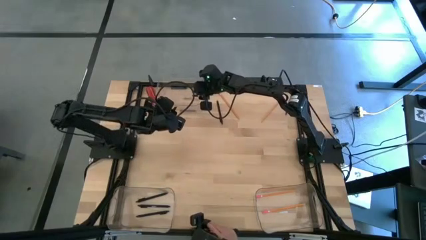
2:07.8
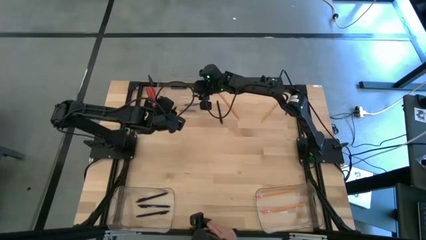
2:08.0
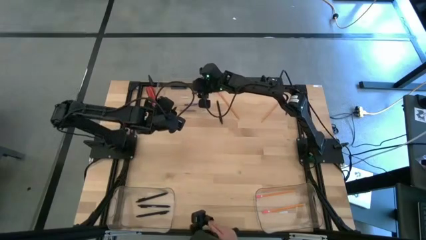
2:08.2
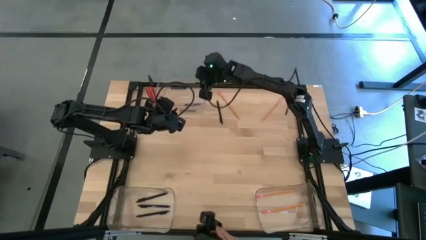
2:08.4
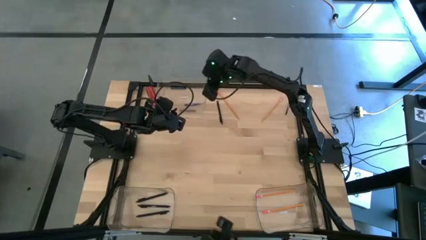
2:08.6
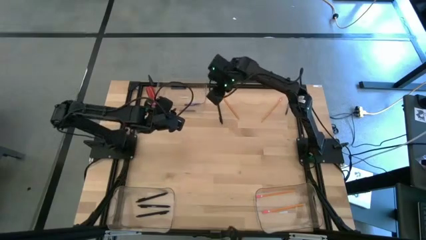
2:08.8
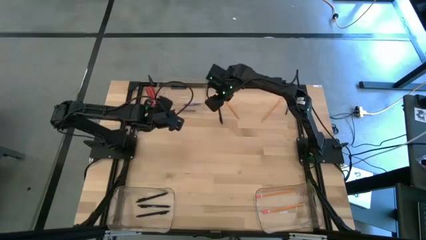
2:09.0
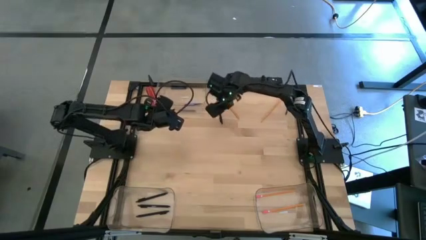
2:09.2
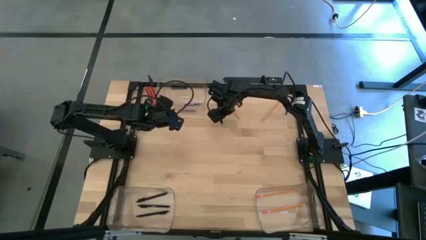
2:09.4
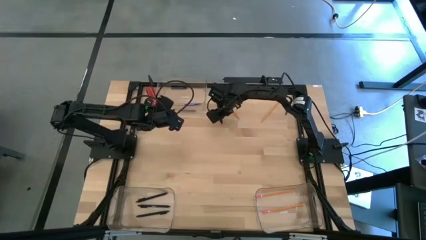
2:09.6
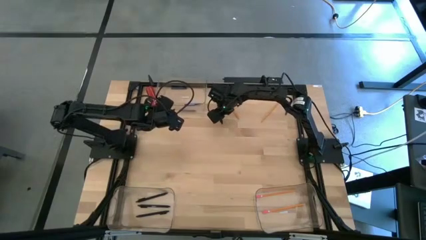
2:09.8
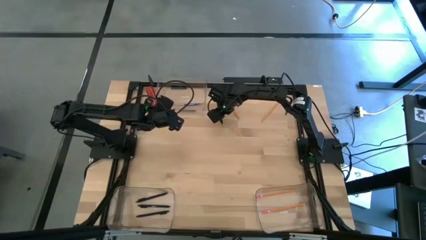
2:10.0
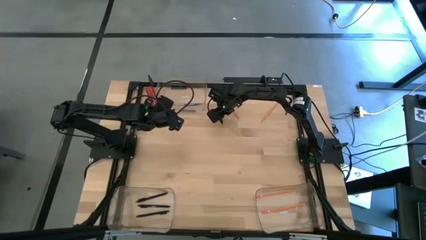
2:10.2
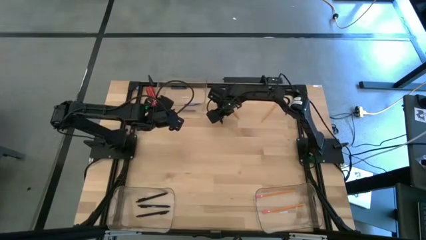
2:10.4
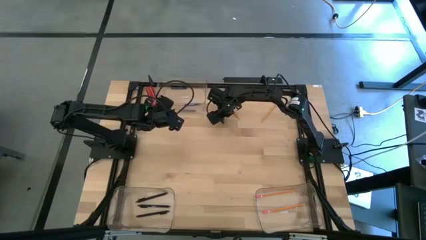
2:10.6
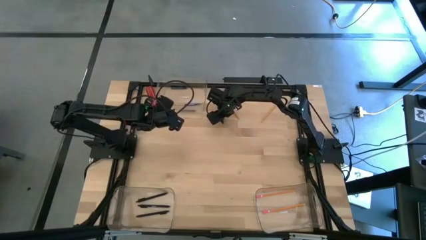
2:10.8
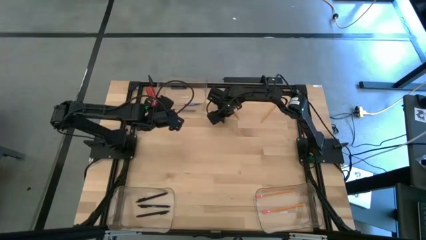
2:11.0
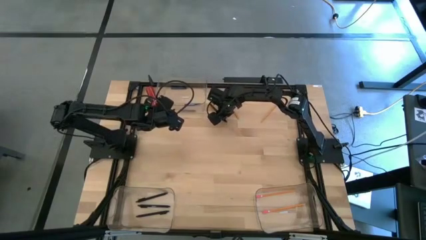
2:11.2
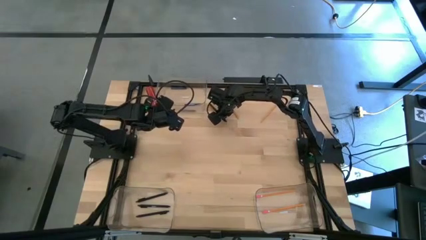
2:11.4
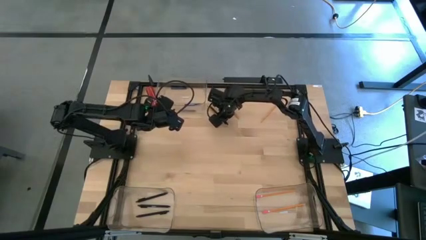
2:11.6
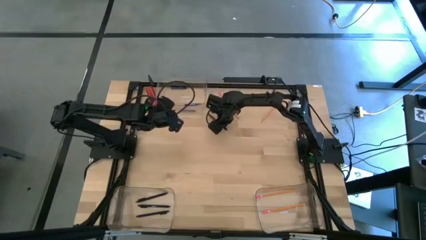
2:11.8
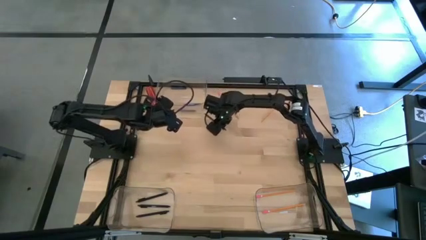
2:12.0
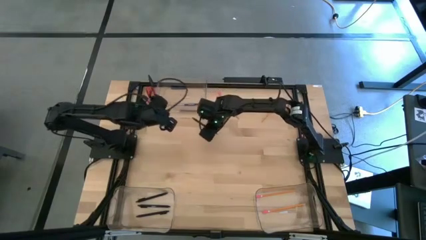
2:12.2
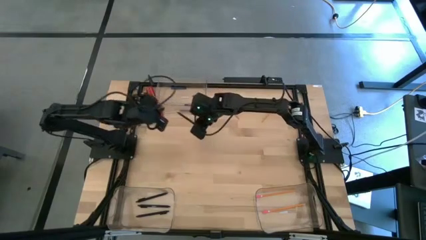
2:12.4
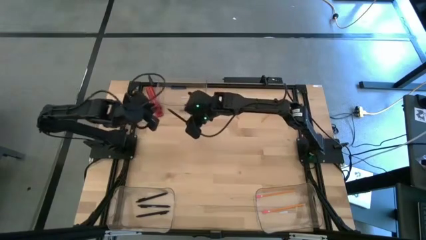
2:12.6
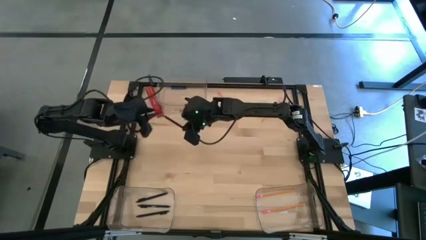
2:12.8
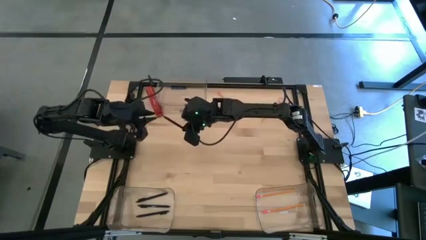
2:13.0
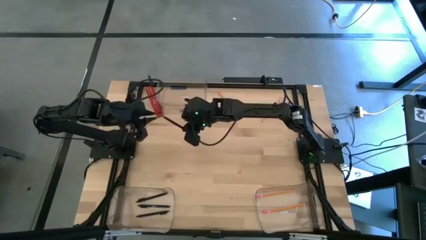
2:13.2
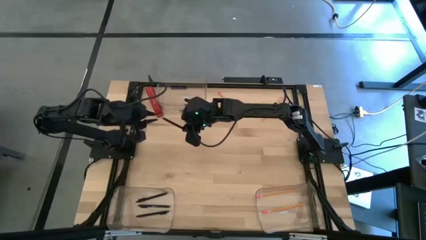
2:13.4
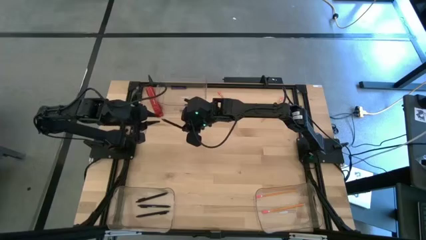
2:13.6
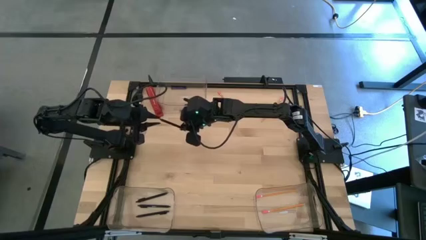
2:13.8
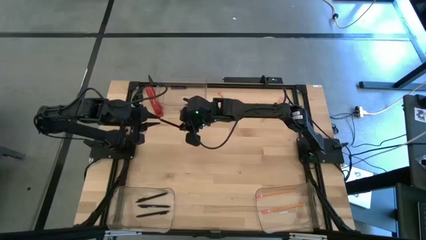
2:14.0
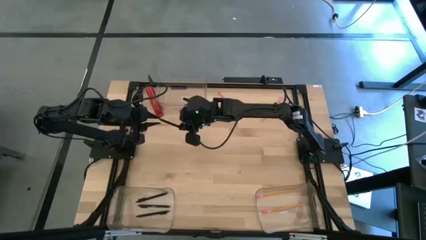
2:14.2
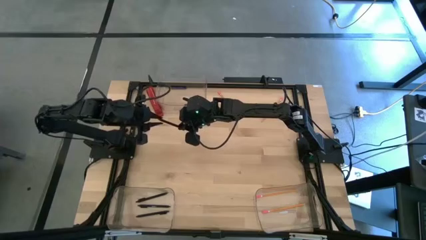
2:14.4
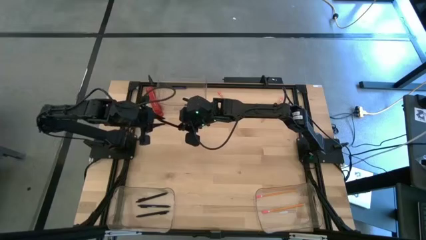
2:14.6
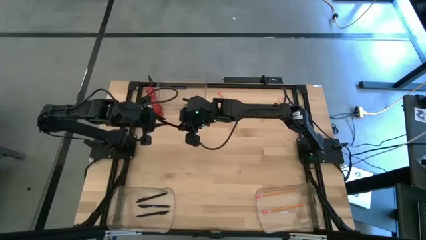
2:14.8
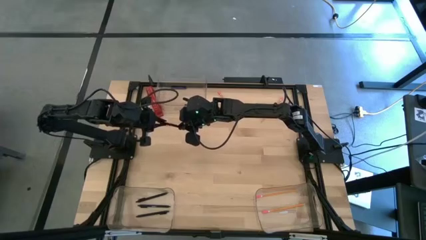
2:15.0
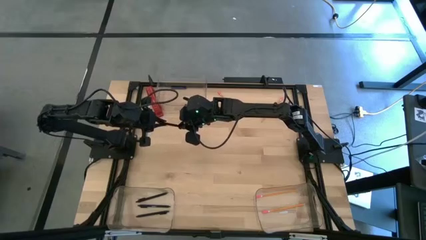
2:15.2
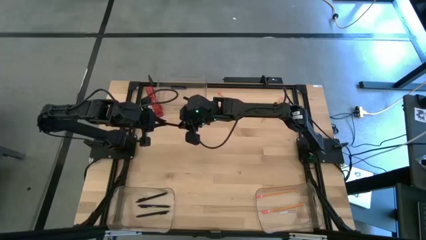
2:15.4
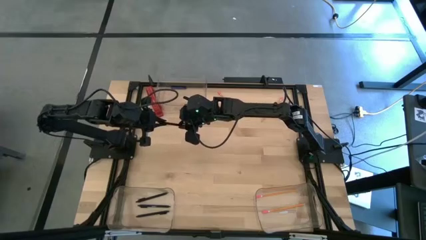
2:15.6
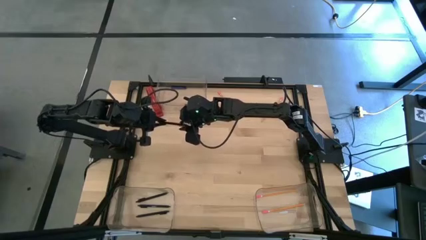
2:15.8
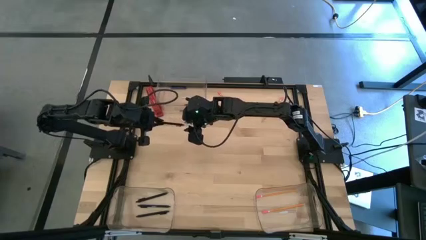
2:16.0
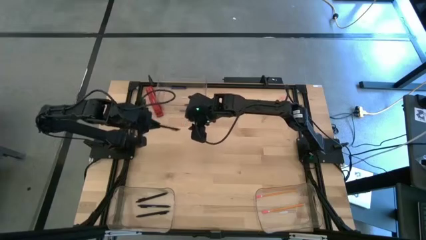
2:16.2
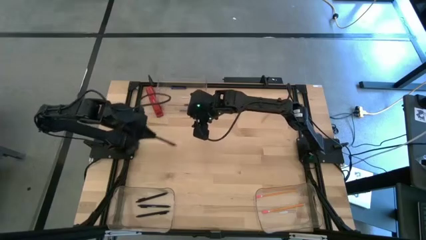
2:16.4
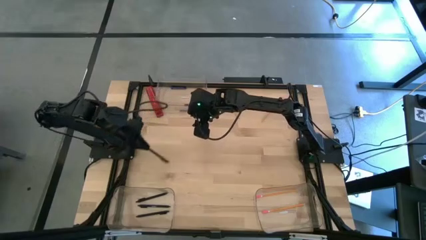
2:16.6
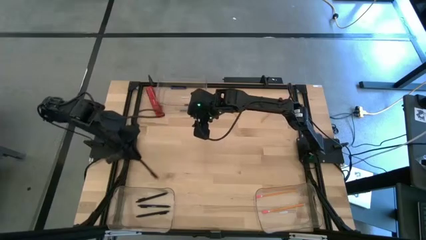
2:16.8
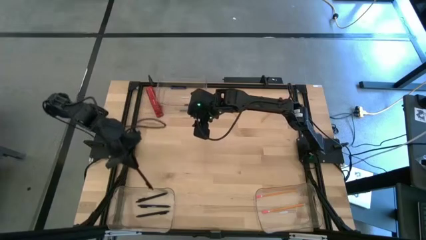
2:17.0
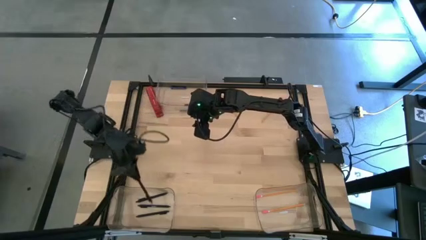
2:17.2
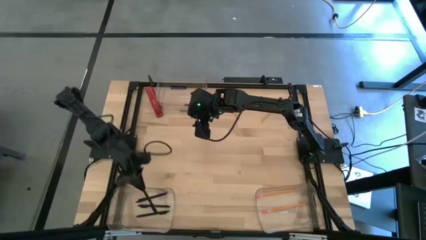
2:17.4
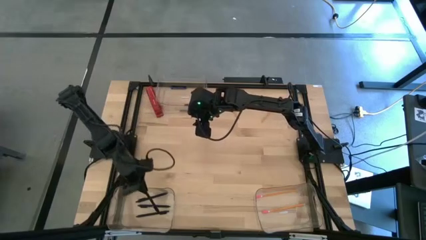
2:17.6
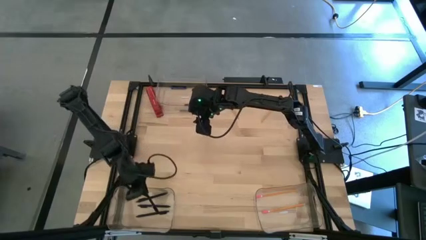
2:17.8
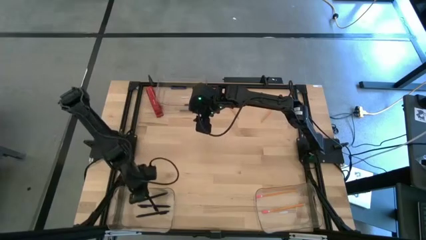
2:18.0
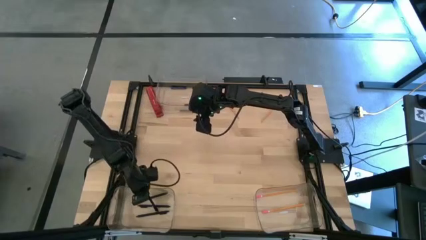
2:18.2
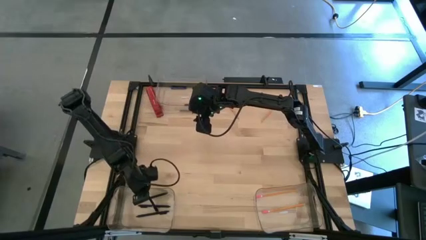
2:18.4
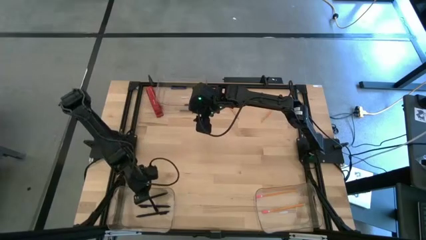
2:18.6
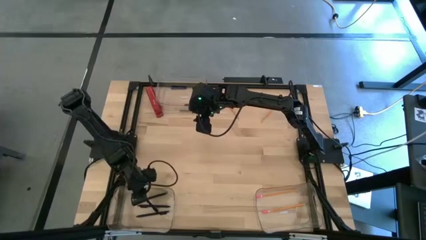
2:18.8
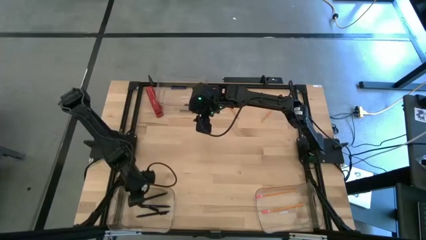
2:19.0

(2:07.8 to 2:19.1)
Task: Sort crayons/erasers/pens/pencils in bins
Put the black pen into the bottom left transparent bin

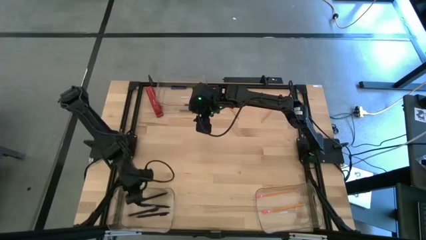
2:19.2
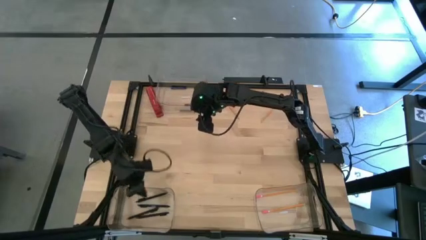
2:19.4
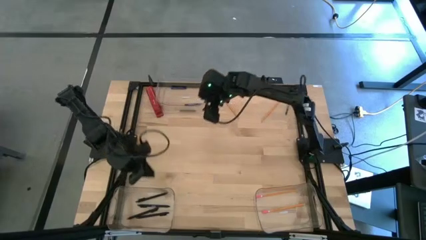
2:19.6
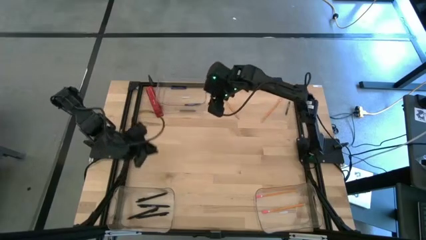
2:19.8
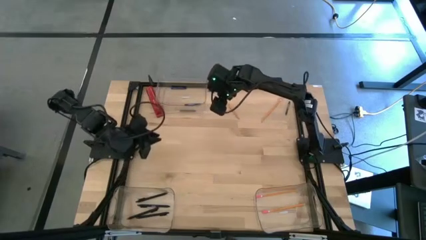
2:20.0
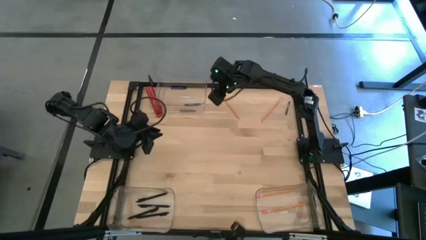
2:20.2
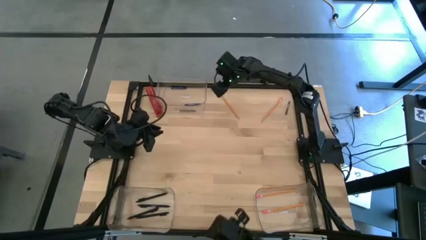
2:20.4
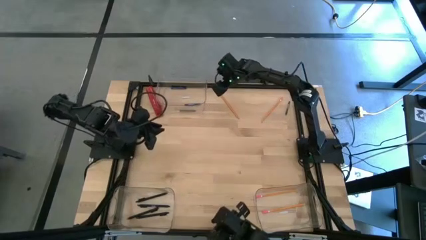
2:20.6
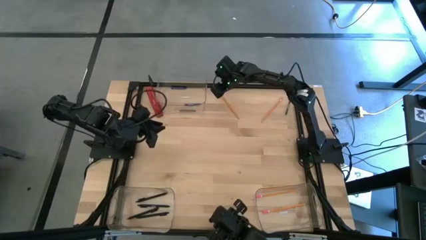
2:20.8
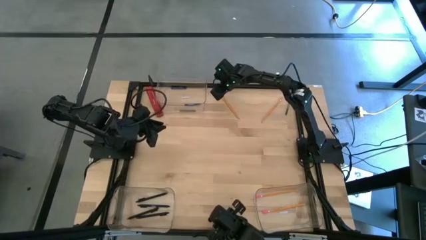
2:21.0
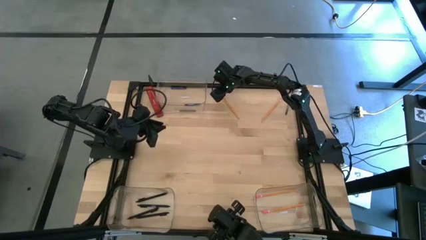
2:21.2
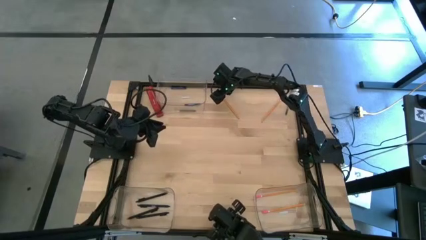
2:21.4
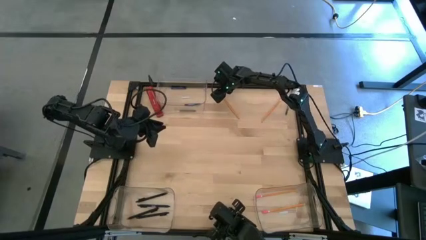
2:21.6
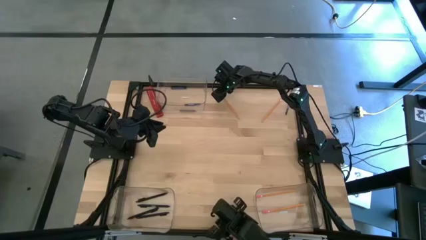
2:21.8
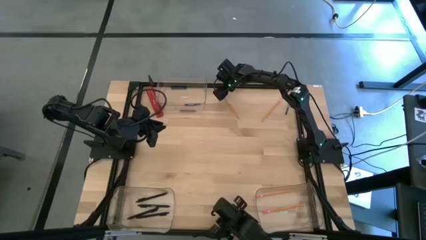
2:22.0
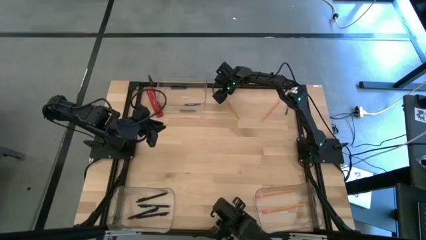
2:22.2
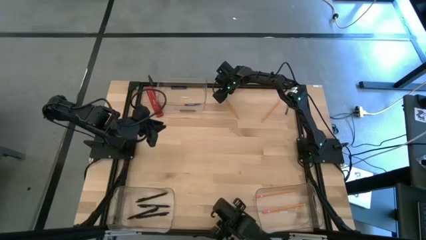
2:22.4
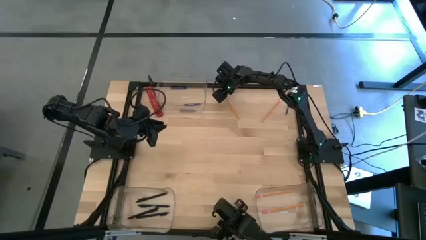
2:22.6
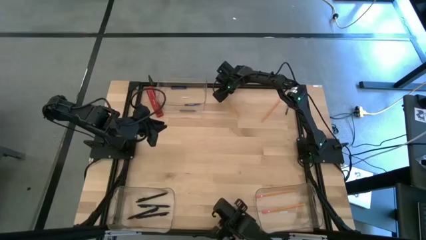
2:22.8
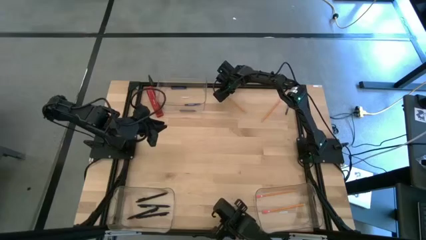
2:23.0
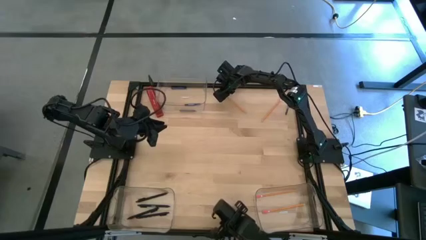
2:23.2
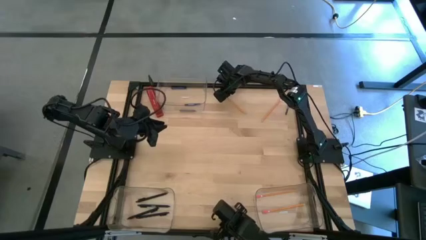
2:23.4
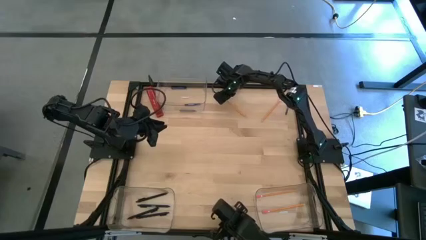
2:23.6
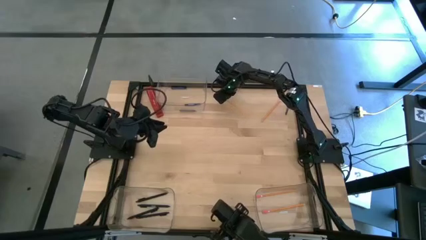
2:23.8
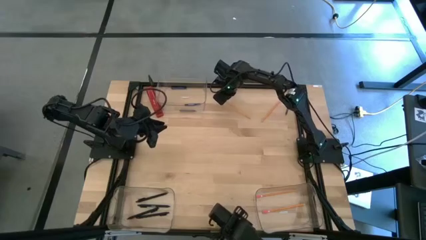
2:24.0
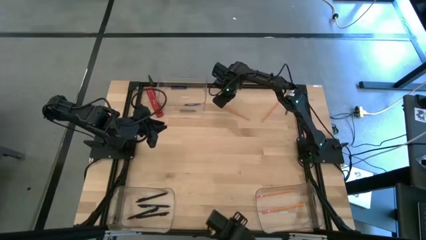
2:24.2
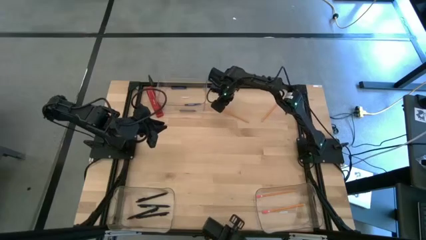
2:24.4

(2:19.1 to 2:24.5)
Put the yellow pencil into the bottom right transparent bin
